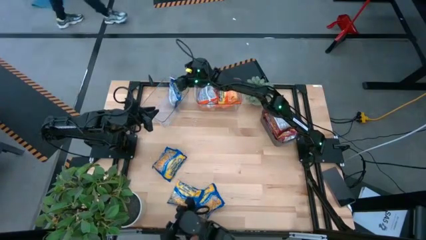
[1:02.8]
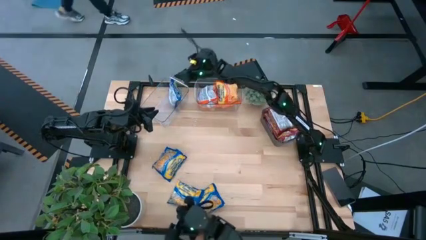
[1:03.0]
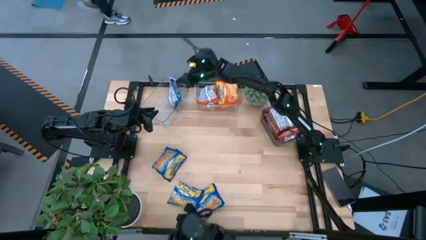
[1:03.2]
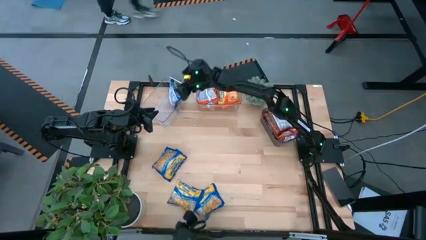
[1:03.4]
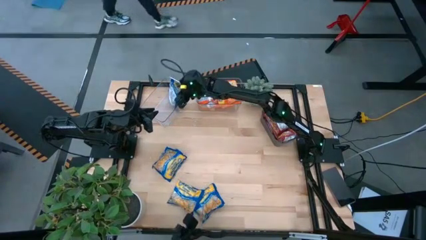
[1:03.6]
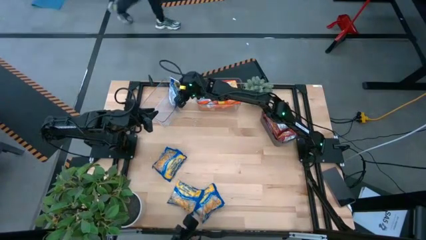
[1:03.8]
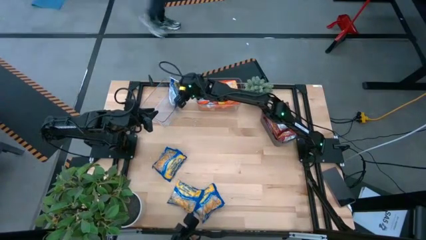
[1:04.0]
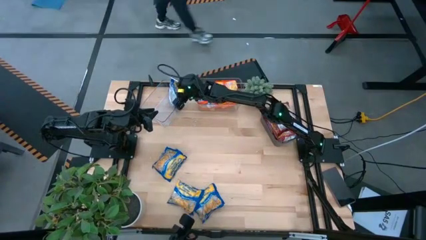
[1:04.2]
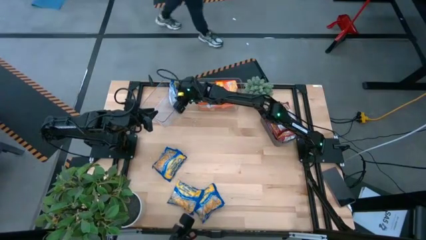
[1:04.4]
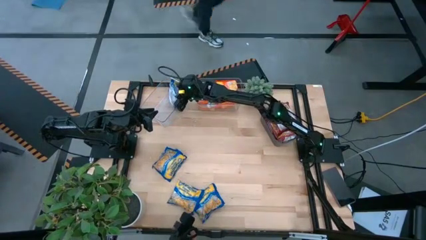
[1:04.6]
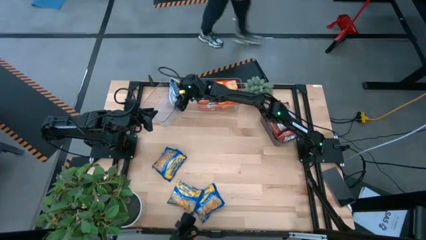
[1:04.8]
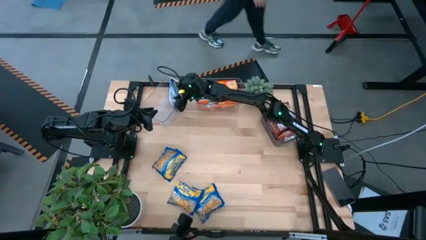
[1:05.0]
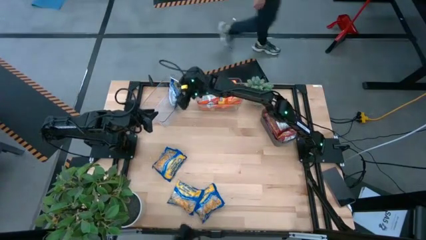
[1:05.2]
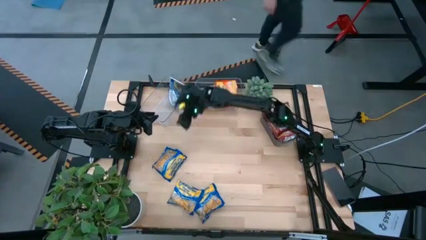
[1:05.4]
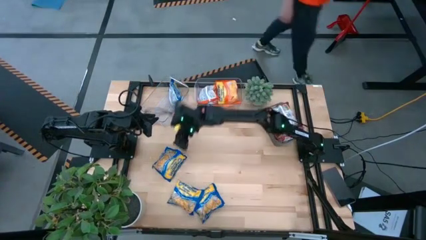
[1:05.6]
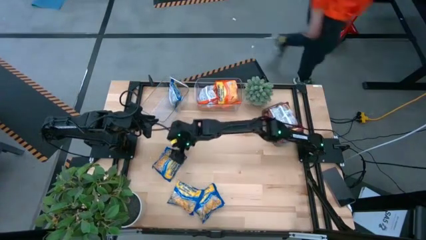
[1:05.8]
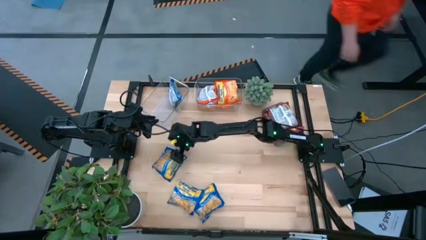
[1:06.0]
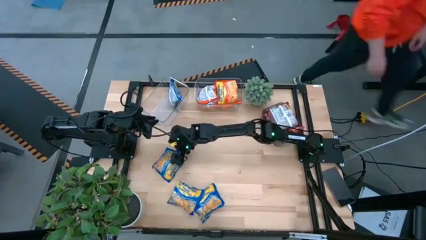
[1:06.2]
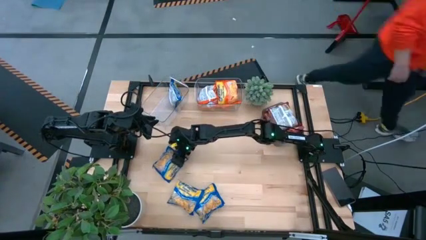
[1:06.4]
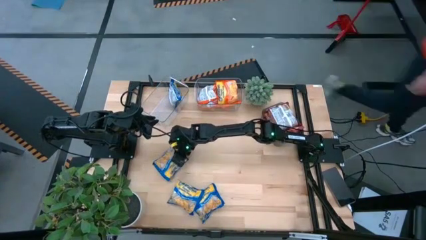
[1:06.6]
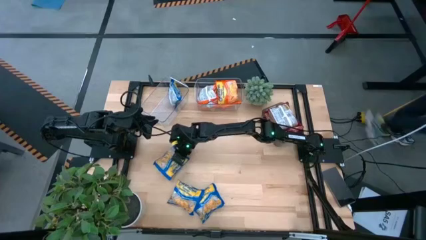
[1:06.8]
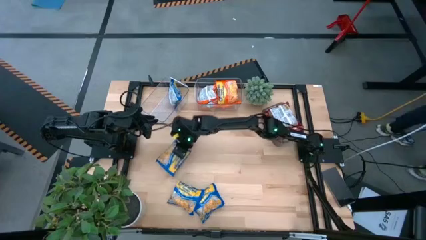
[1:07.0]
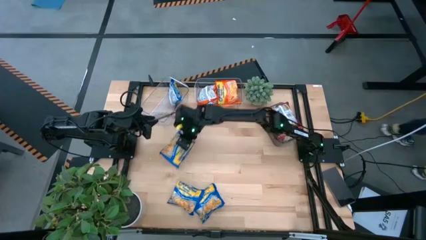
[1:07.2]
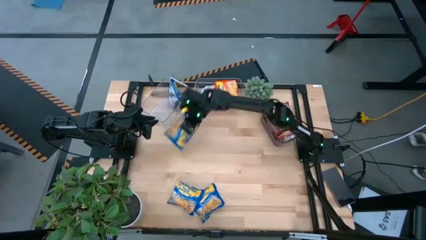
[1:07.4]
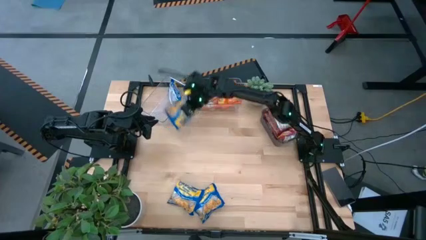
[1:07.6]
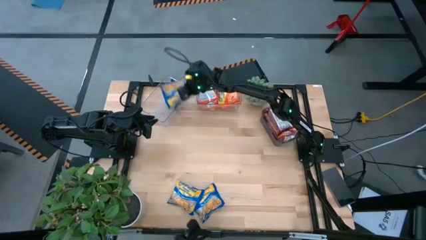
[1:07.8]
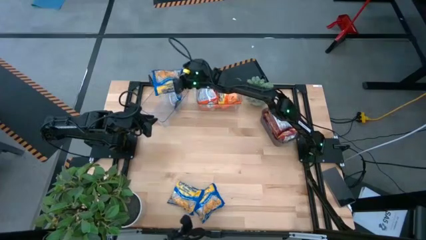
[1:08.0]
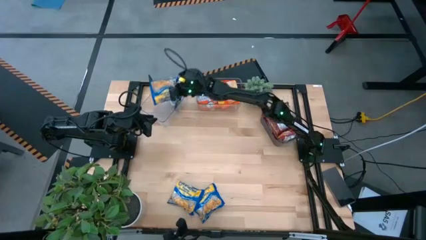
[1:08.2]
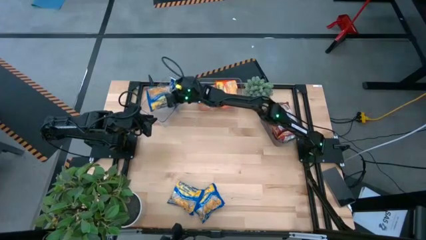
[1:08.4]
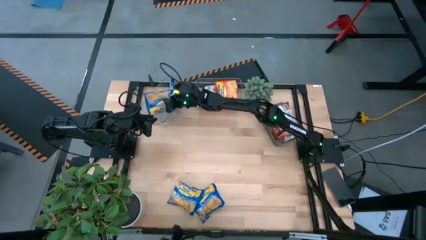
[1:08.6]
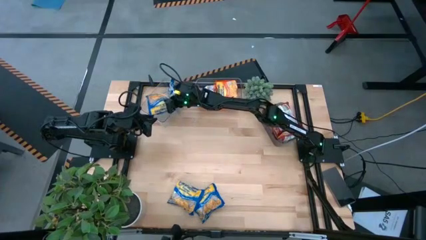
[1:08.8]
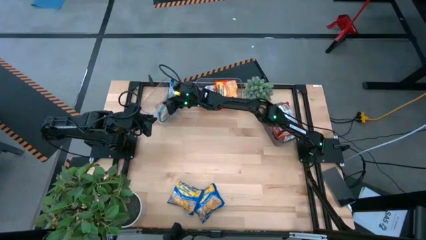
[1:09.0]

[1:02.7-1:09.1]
Task: Sort Maruchan noodles
Put the blue noodle pack into the left transparent bin

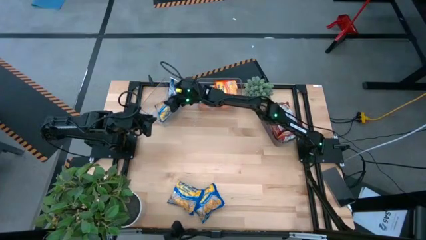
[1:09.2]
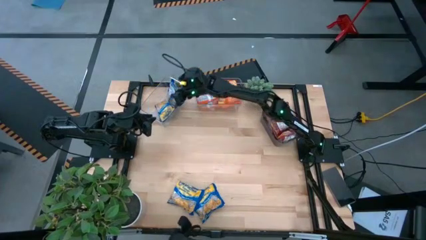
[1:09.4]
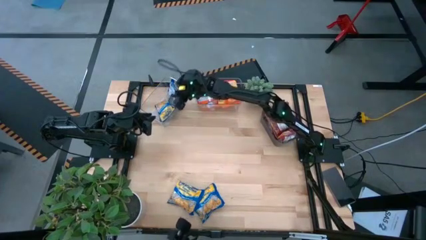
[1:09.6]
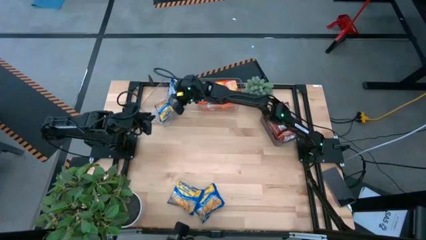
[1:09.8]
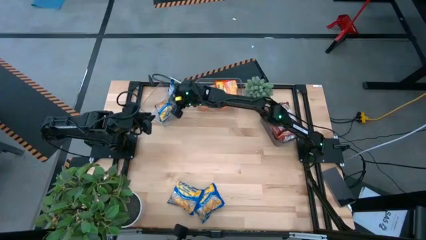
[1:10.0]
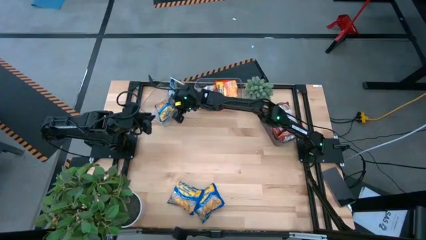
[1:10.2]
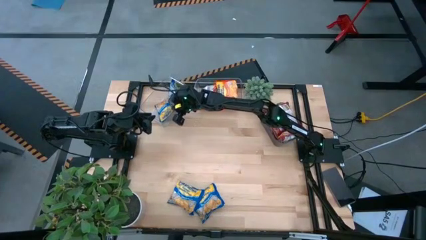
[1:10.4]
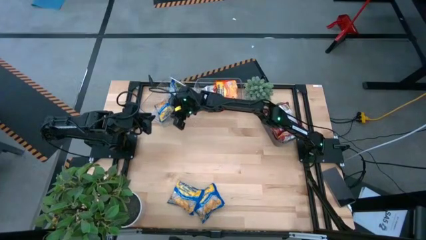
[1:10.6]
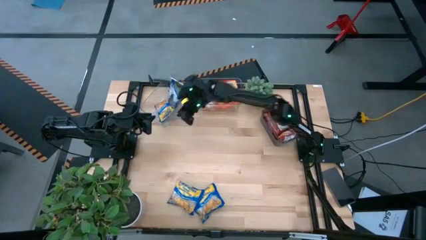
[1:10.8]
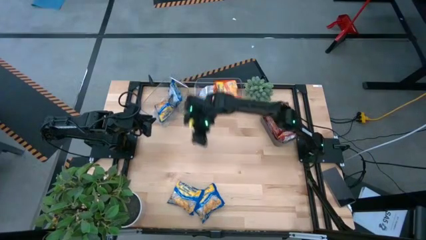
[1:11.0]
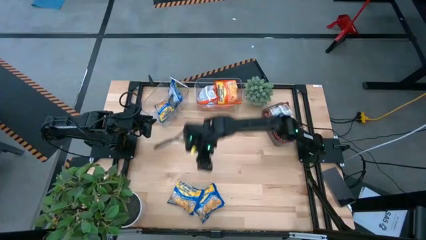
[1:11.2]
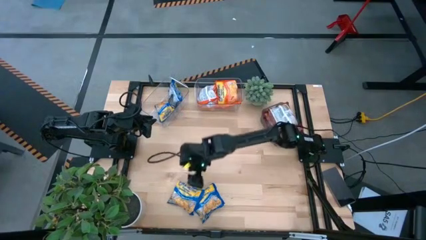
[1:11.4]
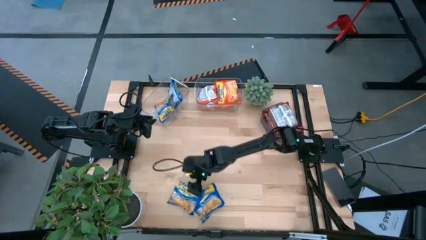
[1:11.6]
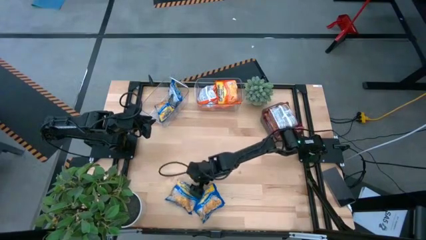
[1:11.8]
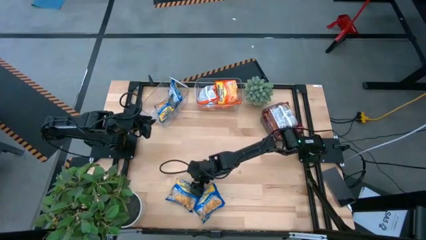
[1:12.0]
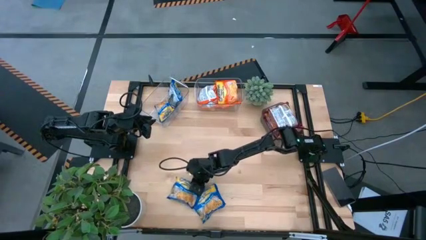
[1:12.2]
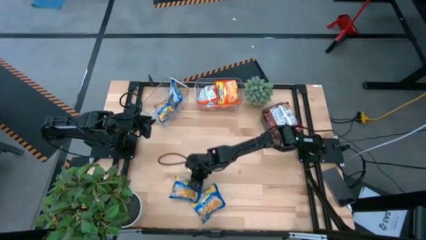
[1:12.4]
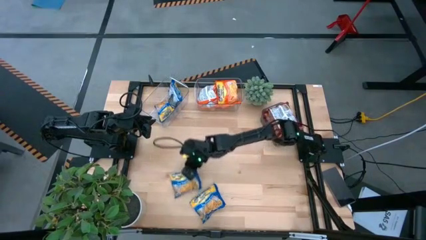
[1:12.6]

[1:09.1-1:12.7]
Put the blue noodle pack into the left transparent bin

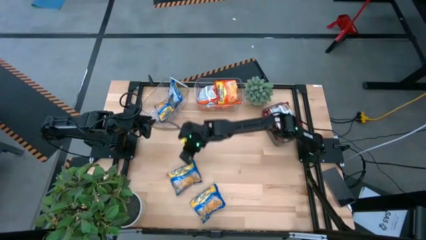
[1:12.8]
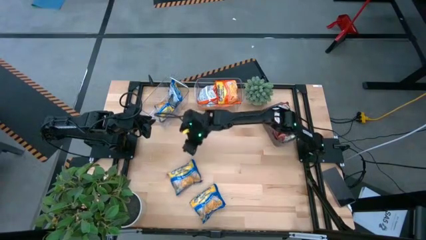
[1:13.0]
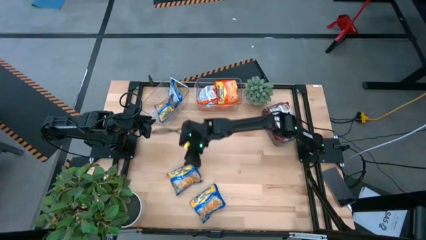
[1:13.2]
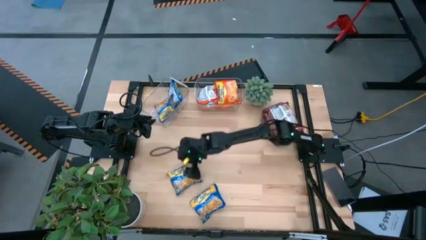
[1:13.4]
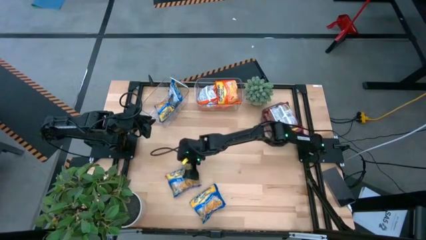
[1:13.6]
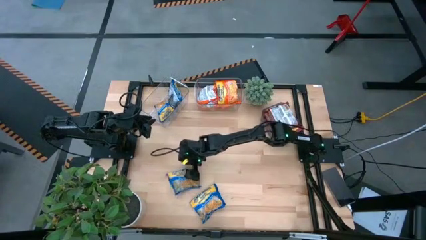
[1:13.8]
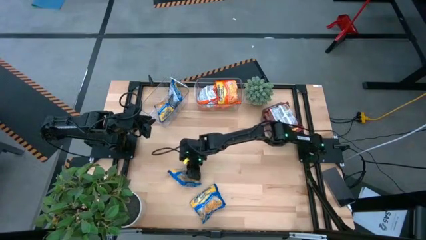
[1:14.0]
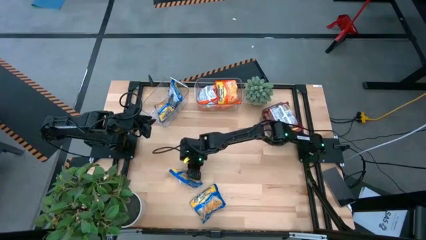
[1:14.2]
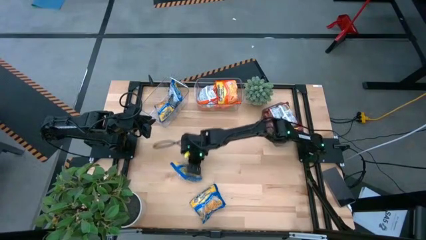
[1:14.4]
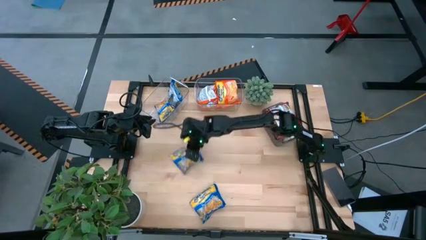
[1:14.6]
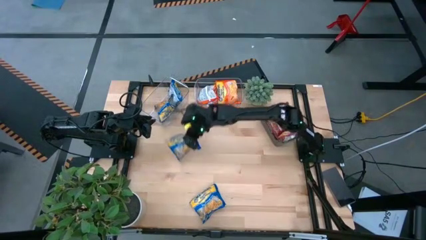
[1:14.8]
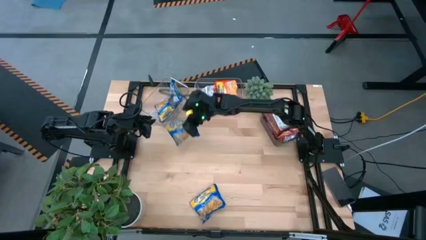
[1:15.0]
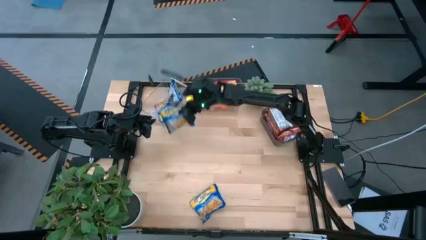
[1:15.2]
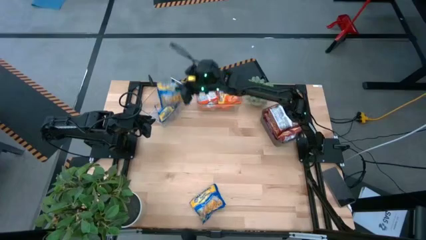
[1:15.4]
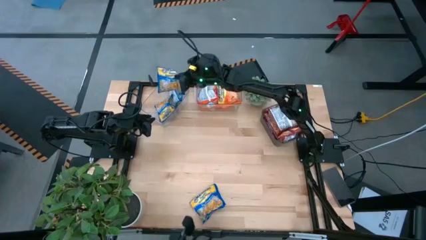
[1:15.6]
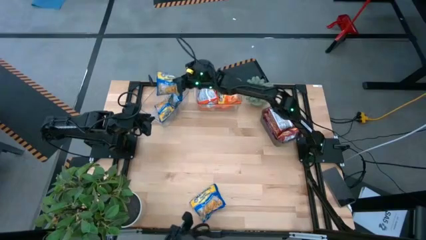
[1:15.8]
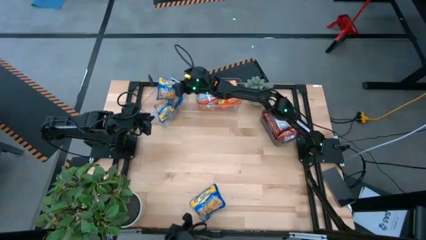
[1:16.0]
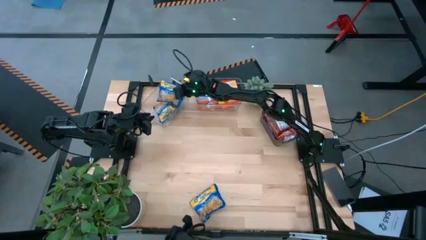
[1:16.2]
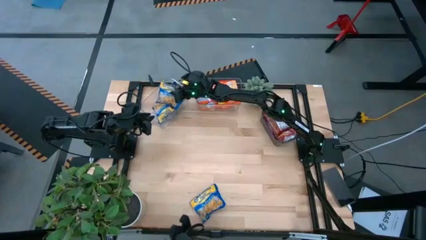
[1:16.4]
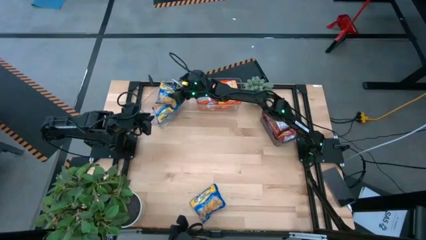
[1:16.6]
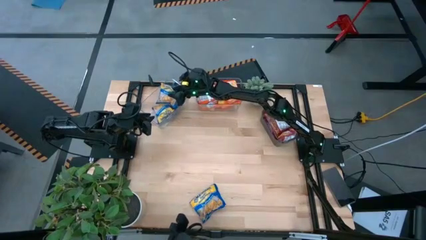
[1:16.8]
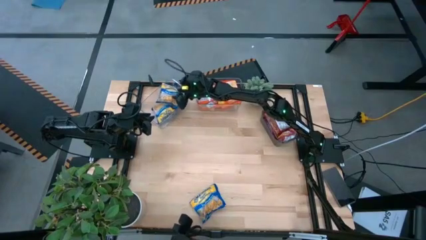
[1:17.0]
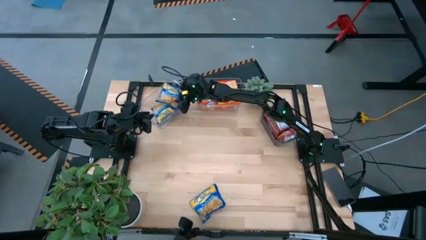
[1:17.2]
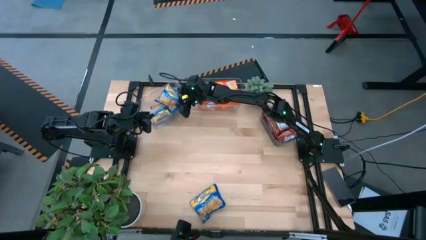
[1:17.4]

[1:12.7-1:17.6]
Put the blue noodle pack into the left transparent bin

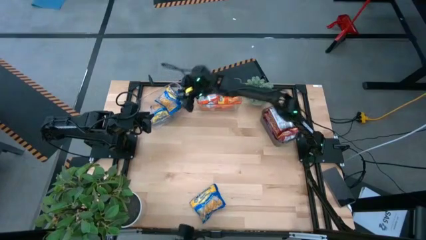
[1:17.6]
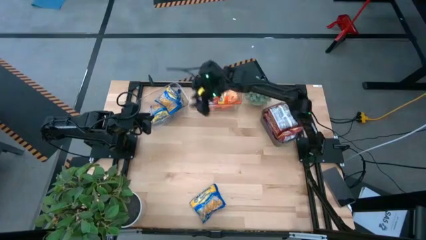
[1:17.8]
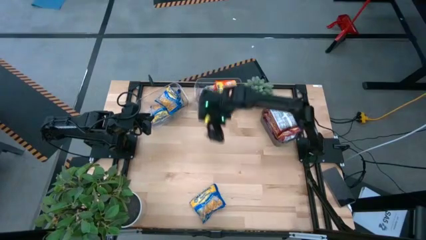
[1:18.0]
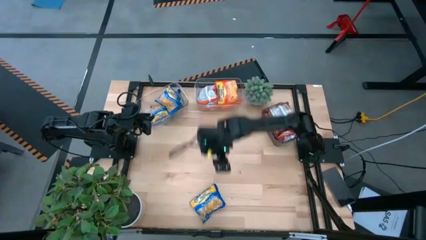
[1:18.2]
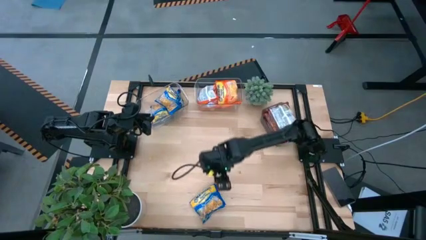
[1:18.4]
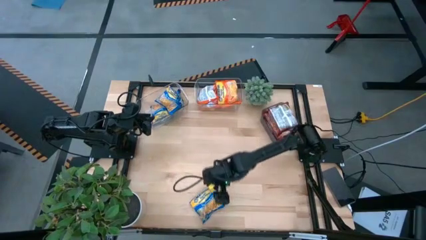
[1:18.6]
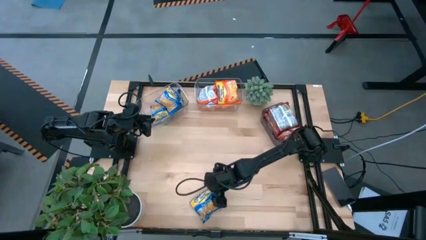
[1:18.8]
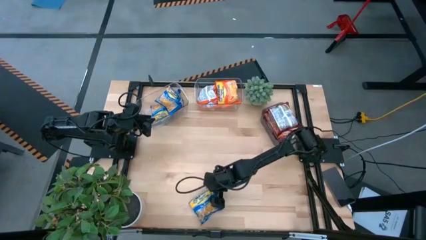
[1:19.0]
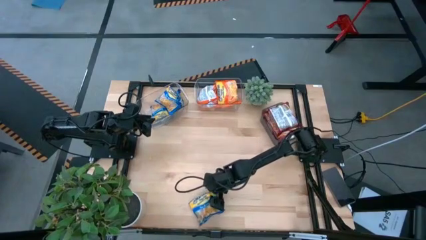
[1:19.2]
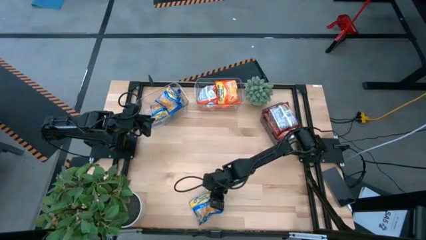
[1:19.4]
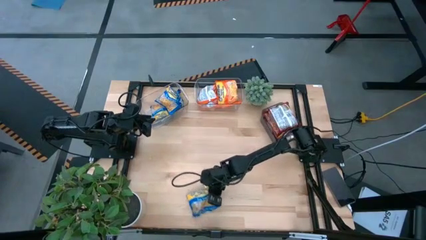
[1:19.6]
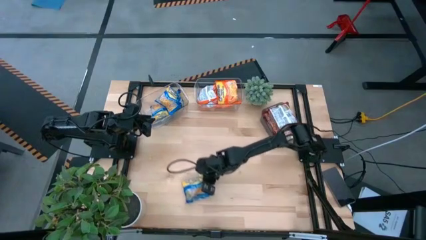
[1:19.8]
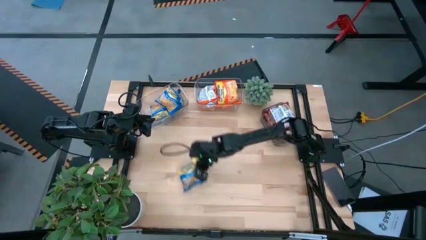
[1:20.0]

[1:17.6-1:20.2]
Put the blue noodle pack into the left transparent bin
